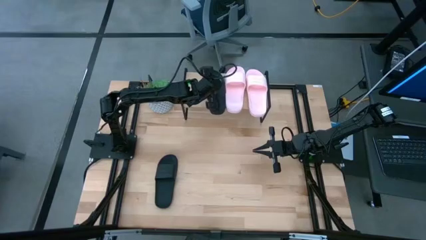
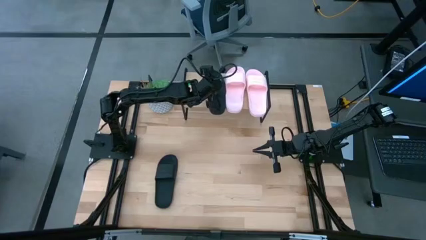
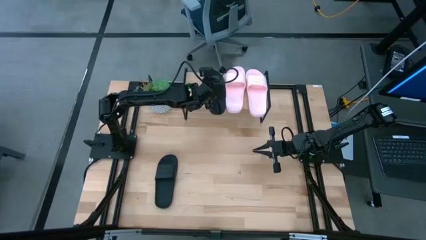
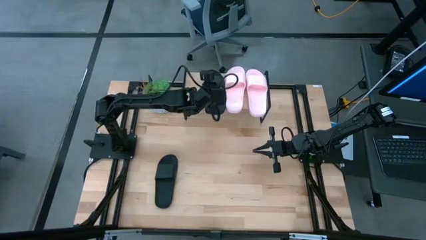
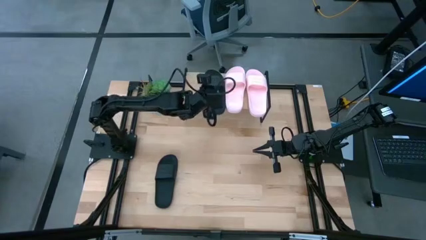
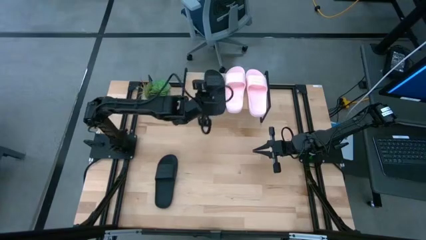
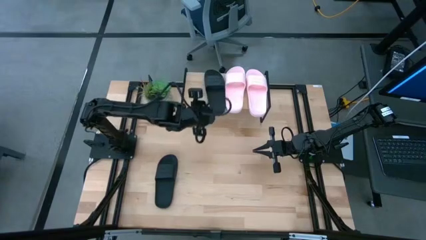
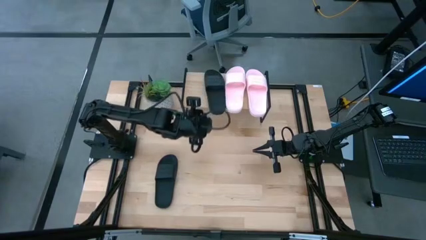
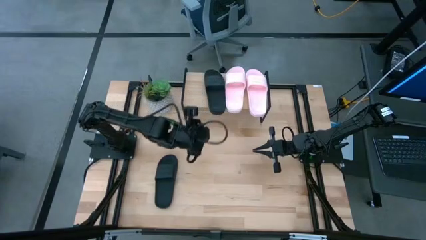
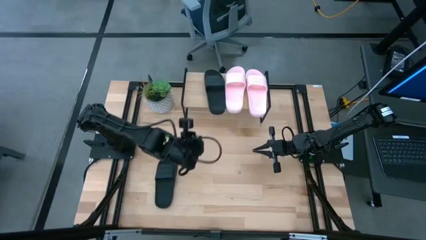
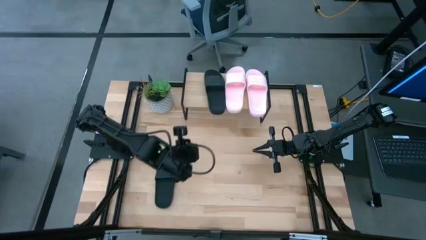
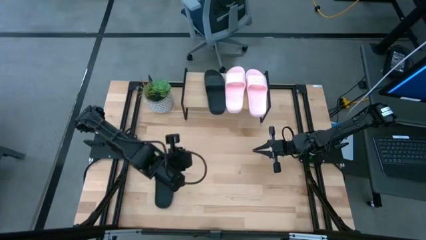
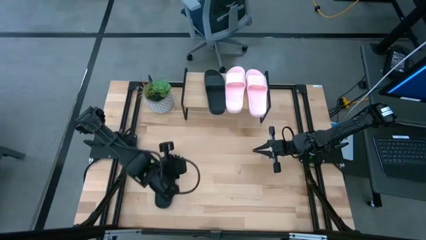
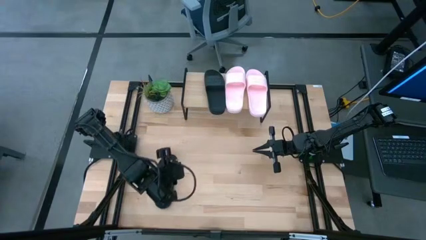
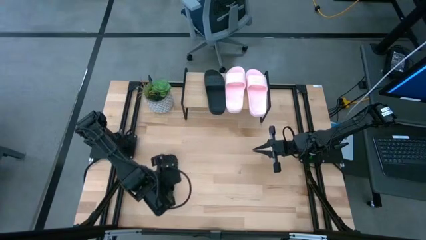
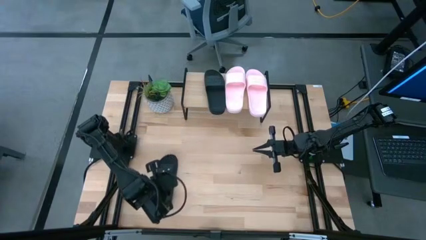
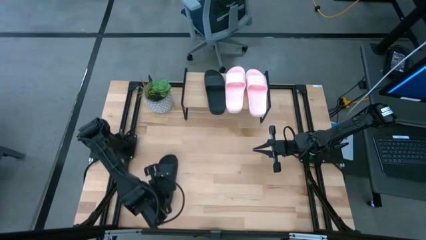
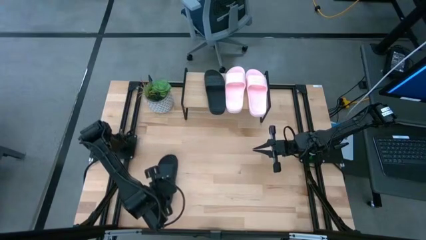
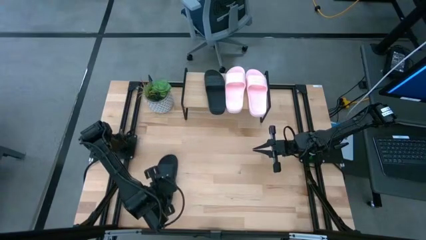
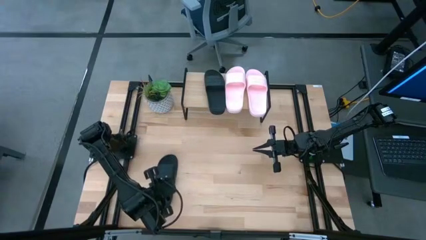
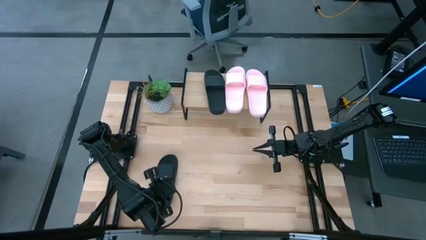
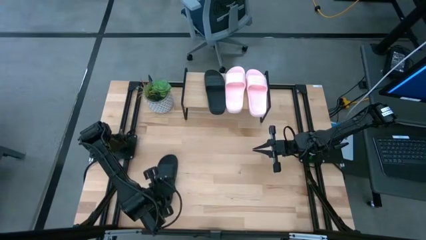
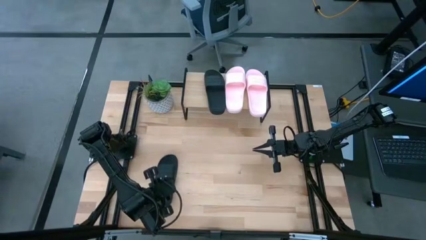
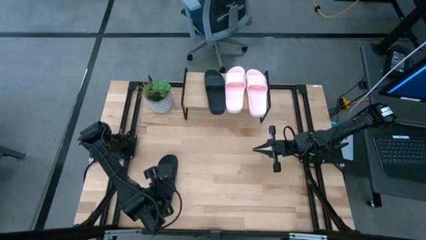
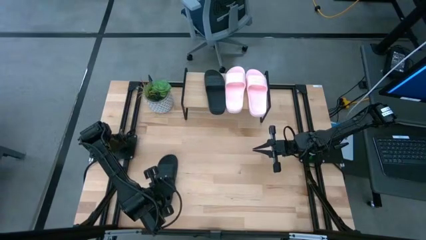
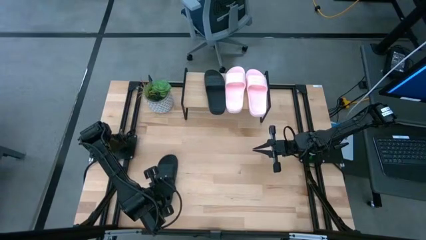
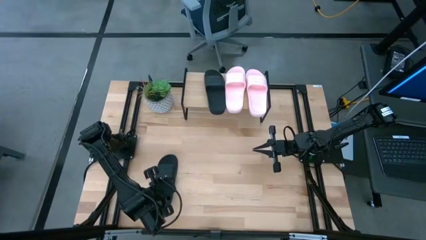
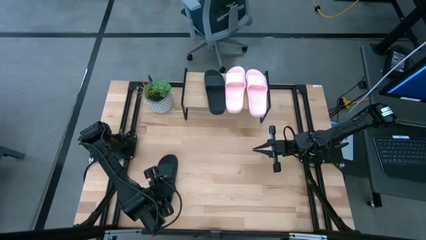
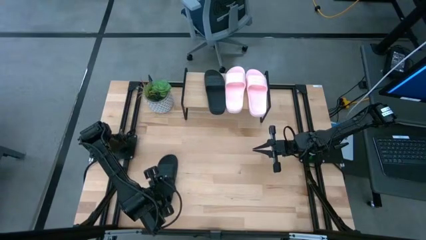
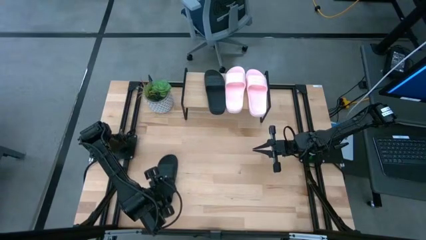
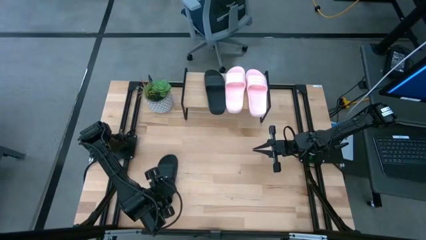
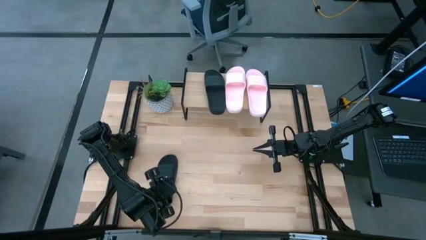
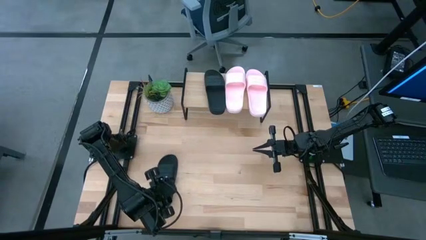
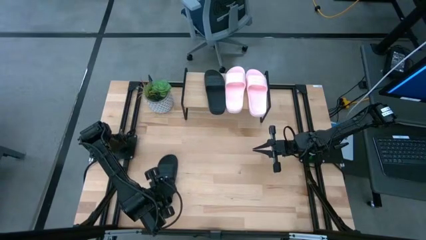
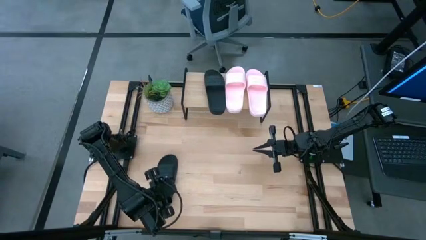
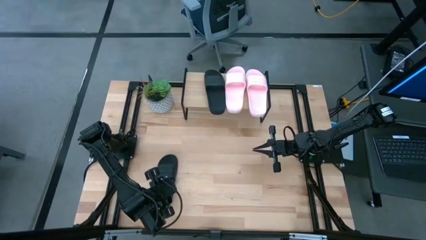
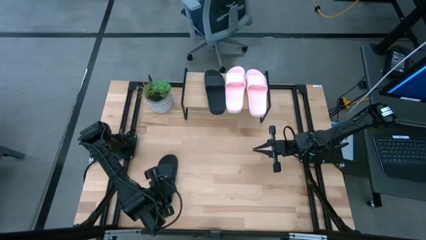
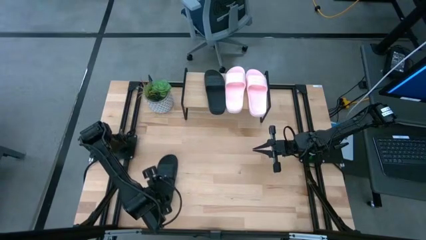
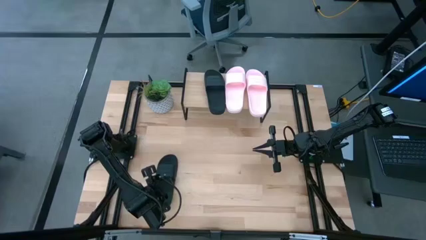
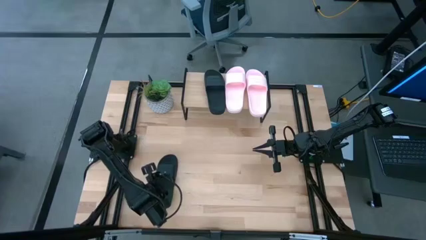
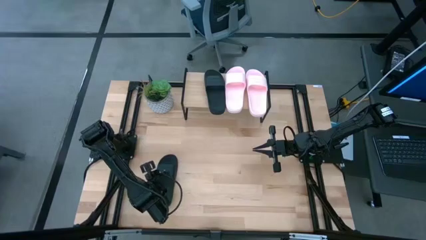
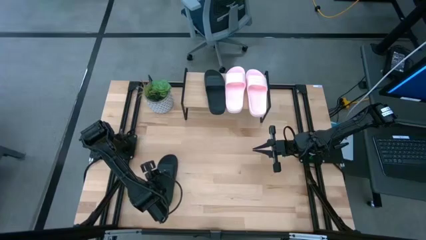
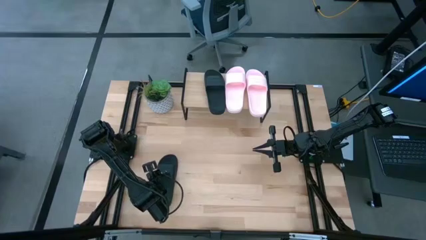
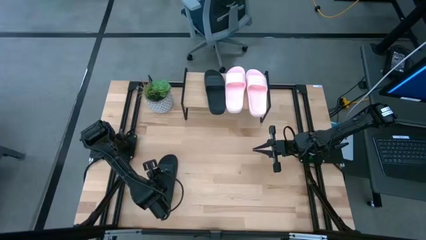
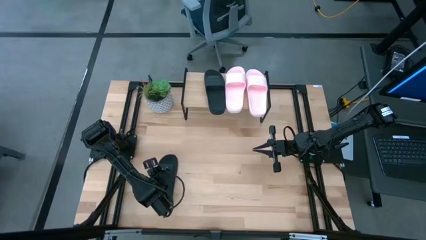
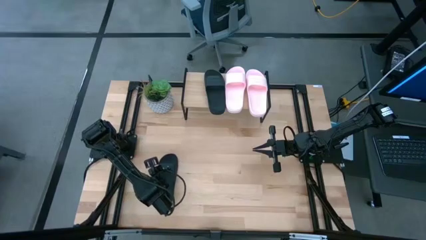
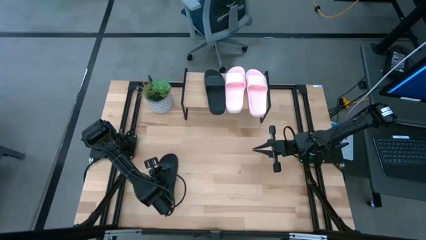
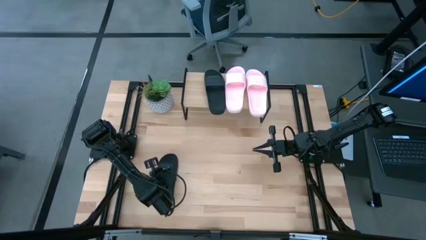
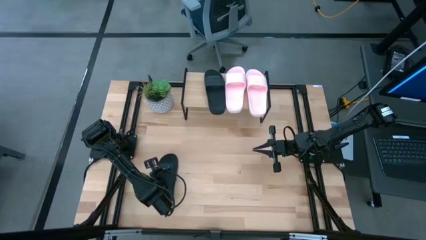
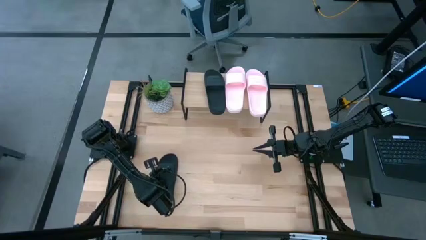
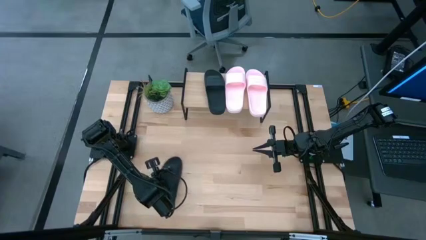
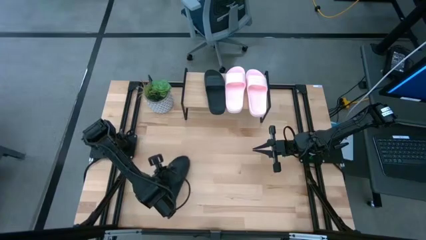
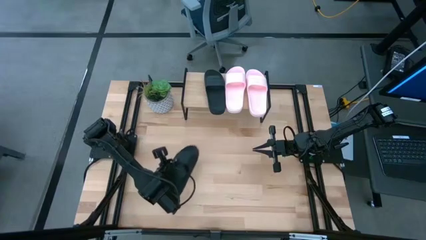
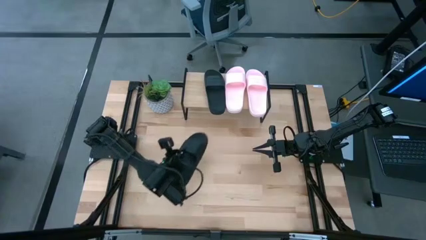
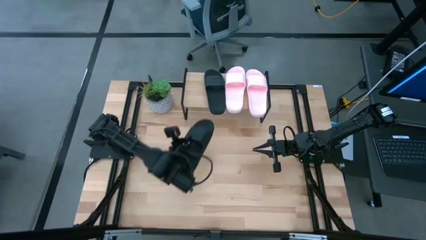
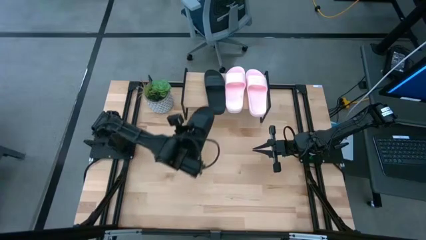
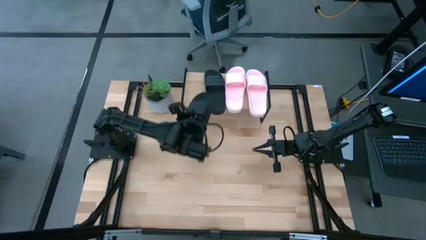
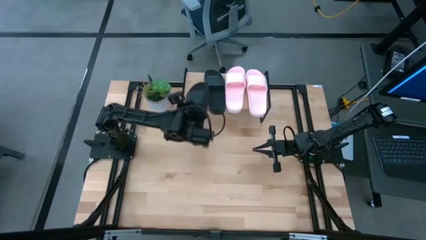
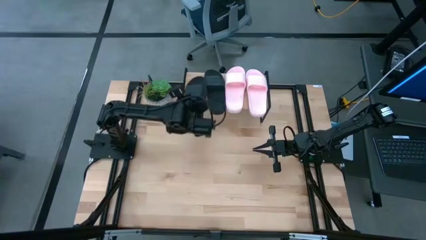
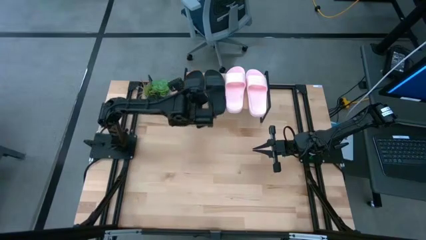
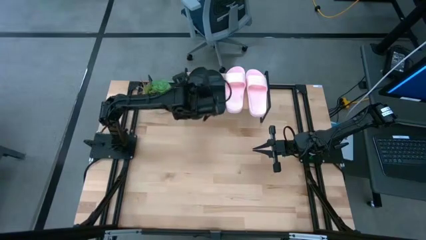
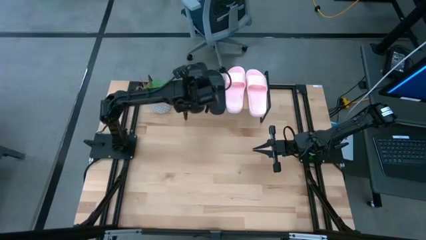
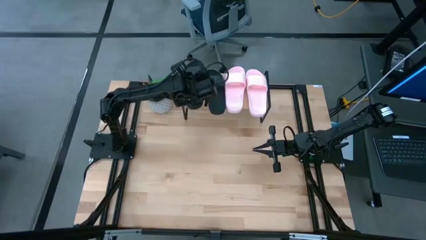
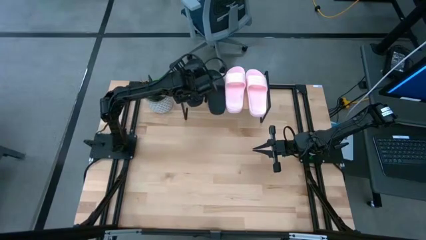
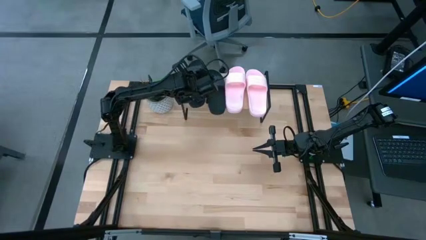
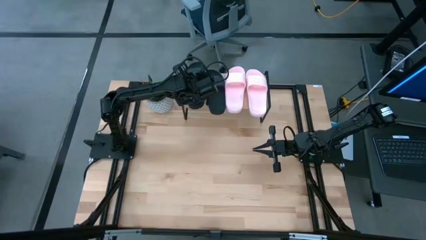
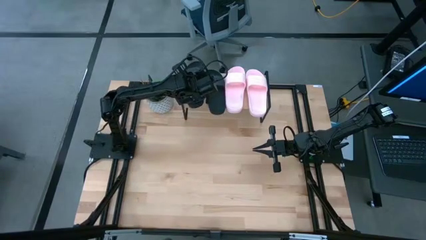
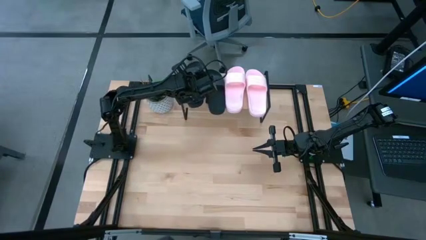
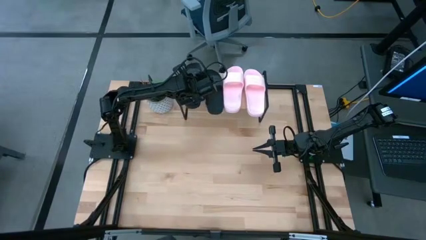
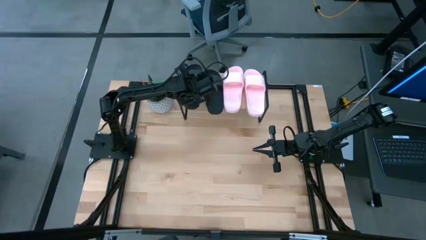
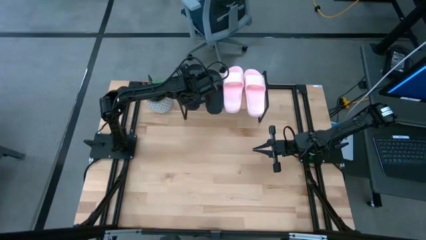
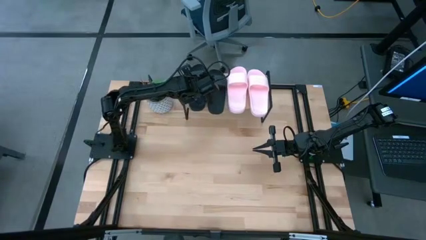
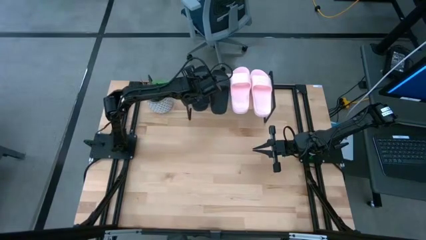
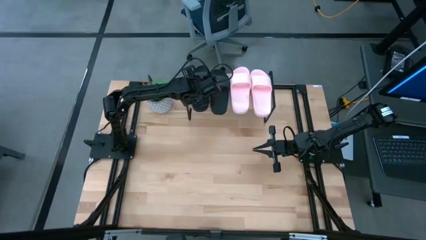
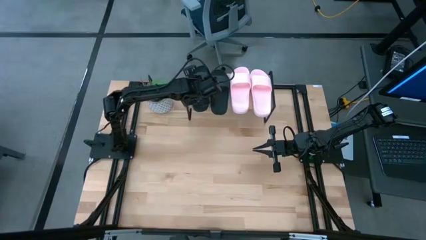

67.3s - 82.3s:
Task: Pick and place slides into the shelf
Put the black slide on the shelf
